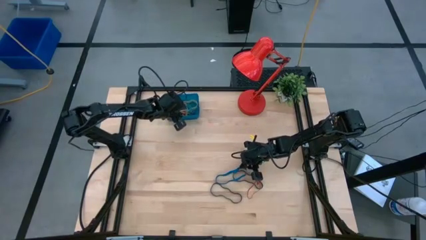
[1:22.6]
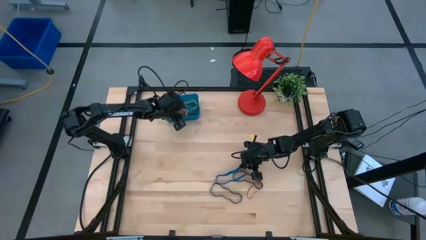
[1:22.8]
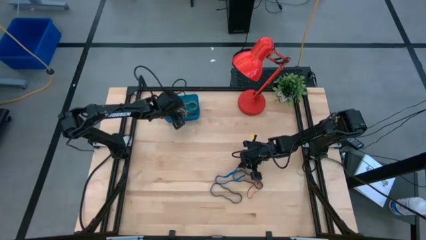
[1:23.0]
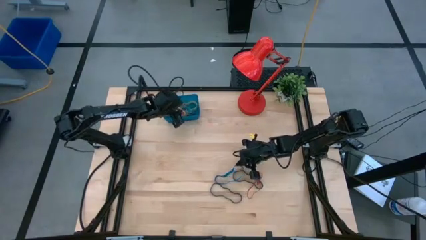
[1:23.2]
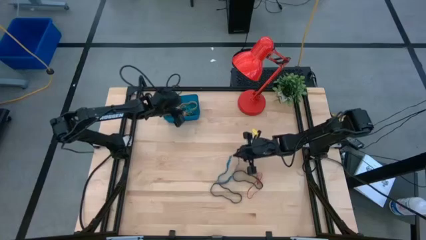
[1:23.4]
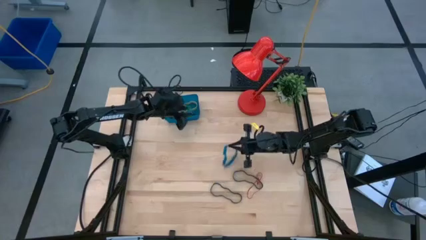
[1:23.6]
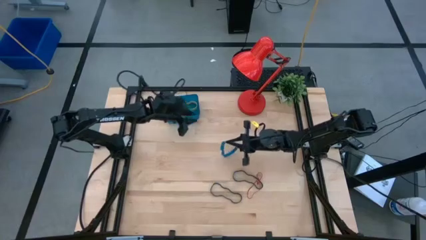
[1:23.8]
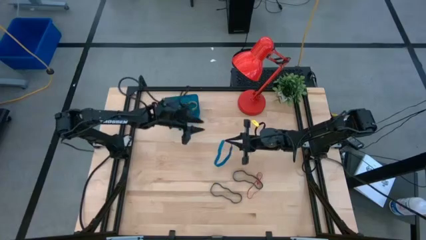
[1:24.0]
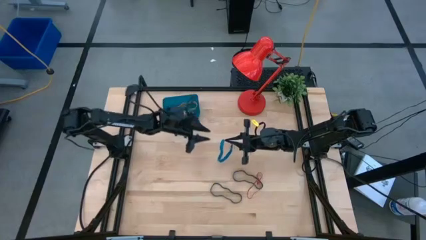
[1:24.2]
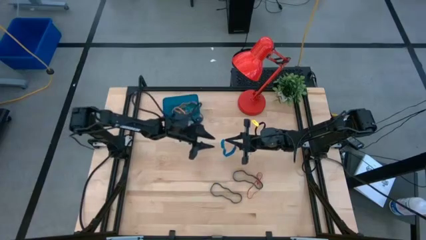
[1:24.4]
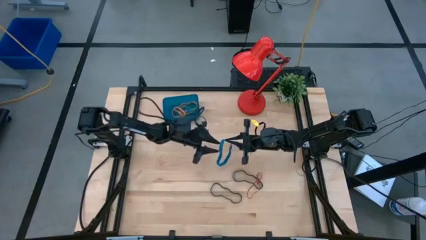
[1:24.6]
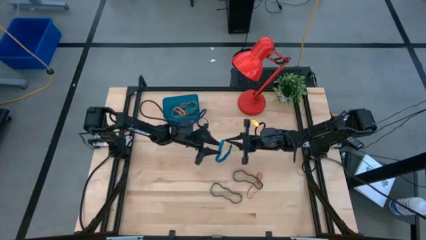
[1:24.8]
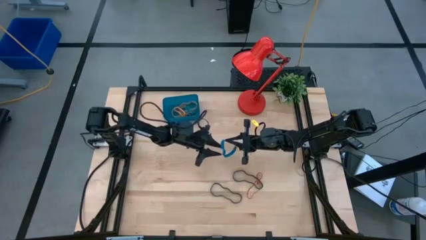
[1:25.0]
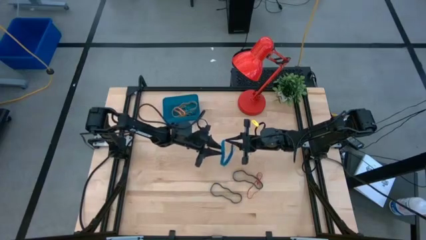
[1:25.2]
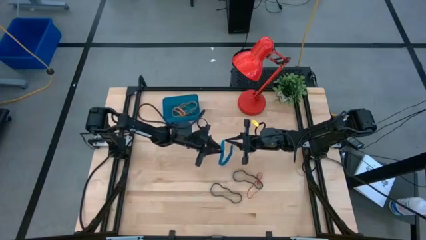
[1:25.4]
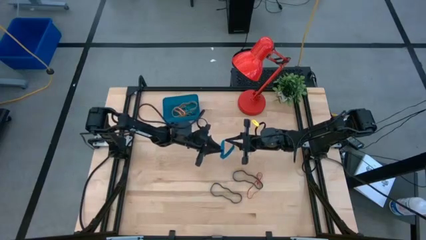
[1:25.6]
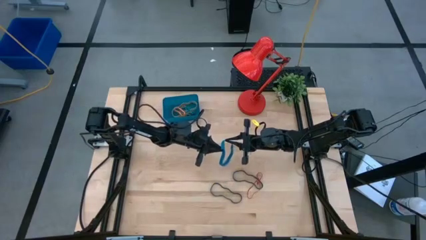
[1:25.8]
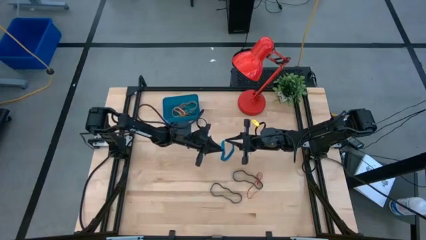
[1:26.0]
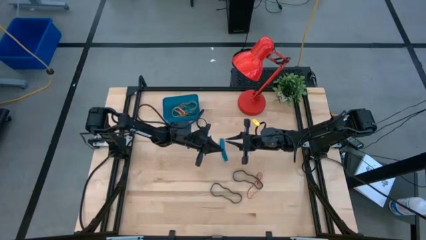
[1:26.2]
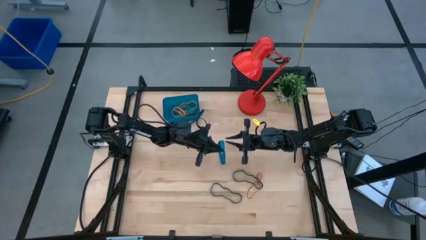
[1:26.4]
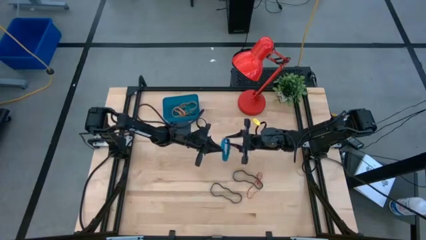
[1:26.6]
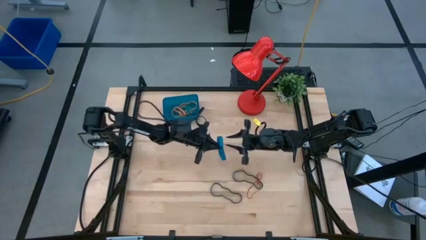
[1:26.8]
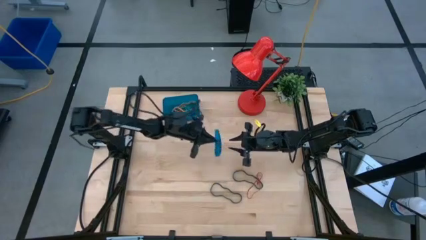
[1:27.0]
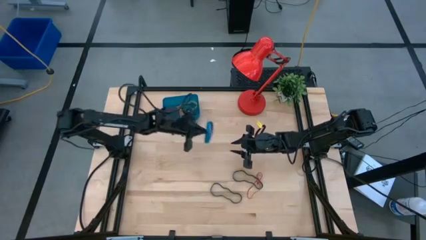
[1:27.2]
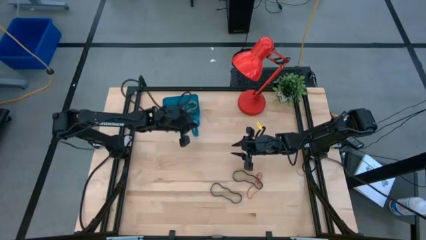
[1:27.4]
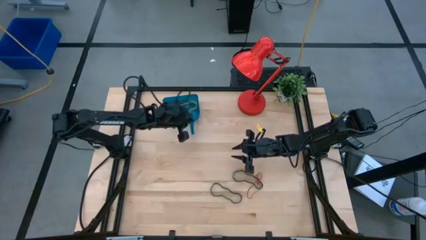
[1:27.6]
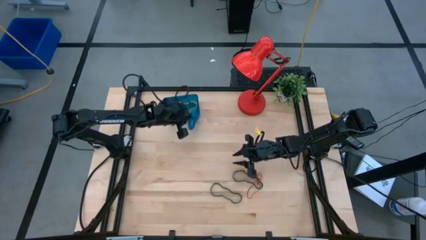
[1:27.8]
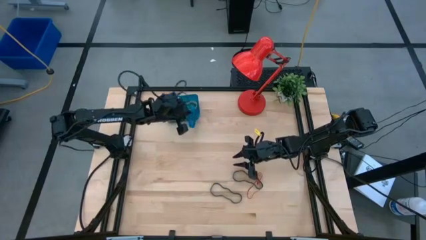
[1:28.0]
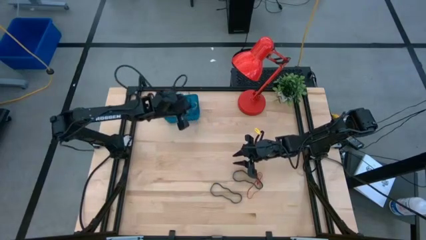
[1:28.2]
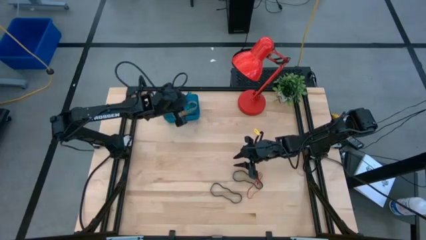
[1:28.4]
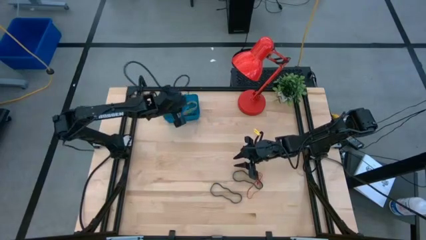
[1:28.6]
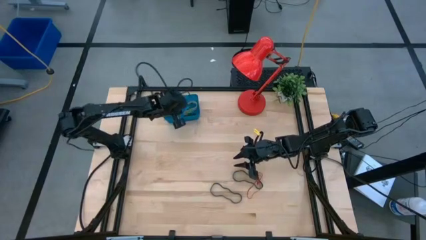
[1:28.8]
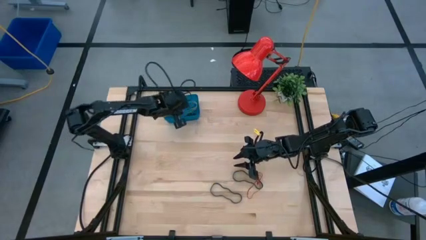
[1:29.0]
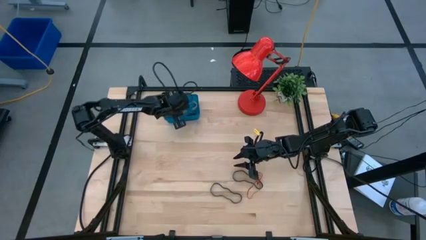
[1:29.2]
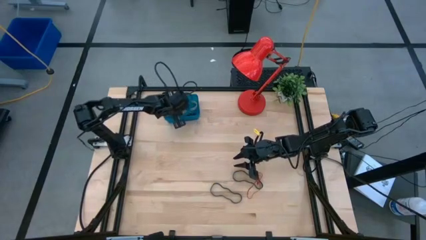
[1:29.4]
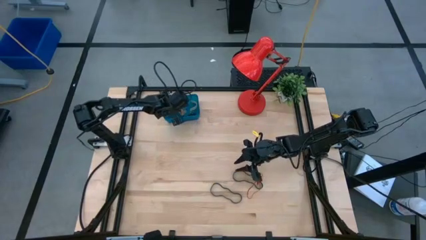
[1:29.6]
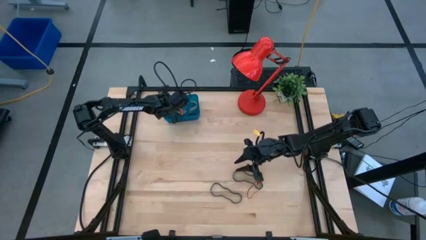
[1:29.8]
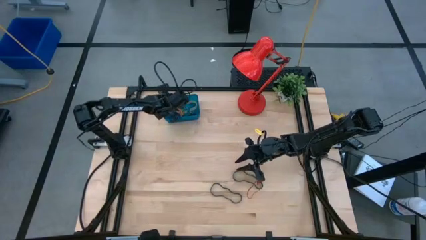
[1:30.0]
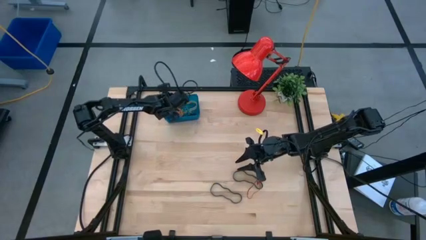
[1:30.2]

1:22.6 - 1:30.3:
Task: Pick and place rubber bands into bin
Put the blue rubber band into the blue container

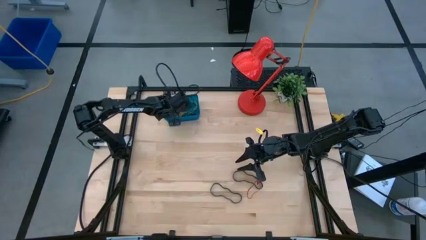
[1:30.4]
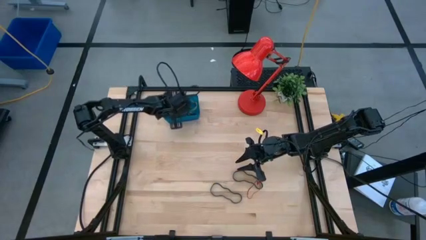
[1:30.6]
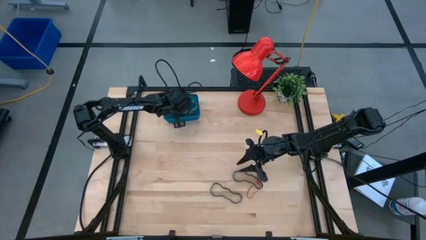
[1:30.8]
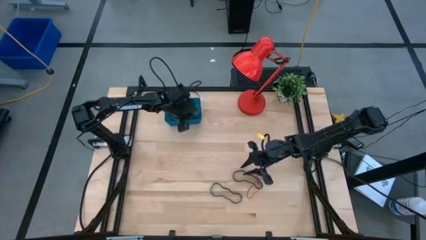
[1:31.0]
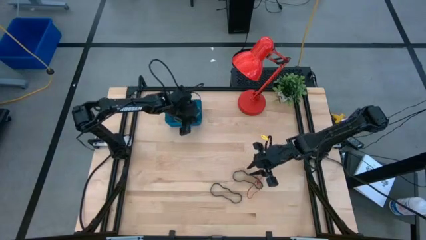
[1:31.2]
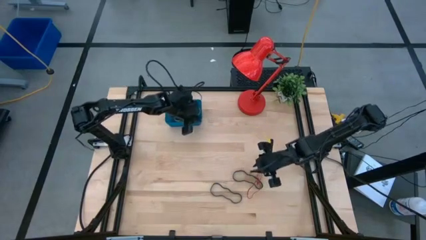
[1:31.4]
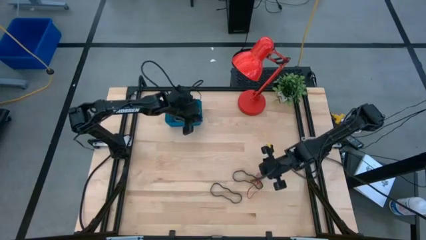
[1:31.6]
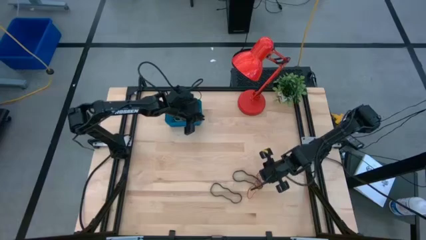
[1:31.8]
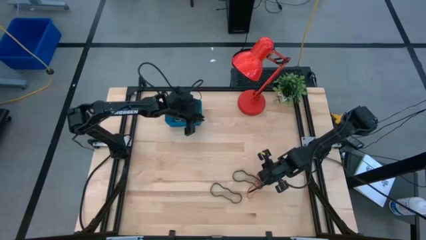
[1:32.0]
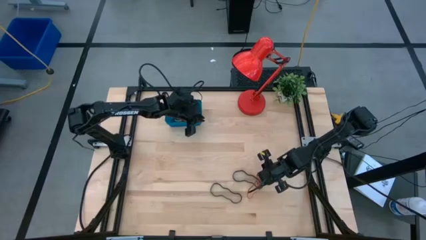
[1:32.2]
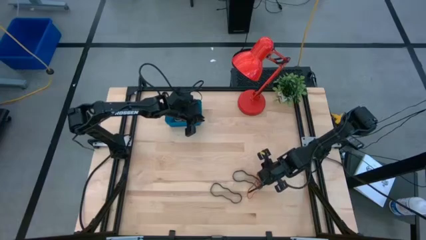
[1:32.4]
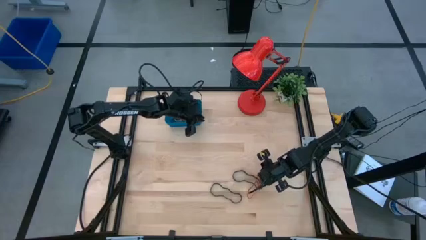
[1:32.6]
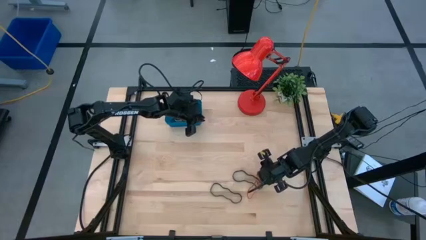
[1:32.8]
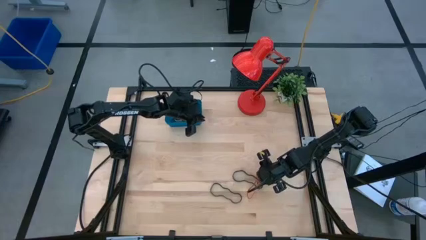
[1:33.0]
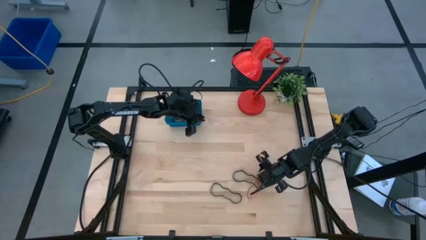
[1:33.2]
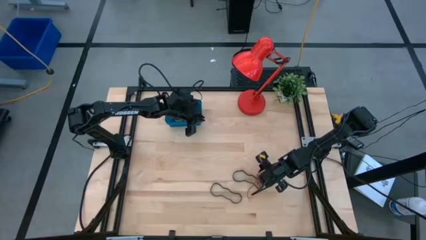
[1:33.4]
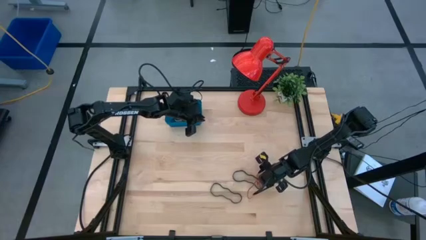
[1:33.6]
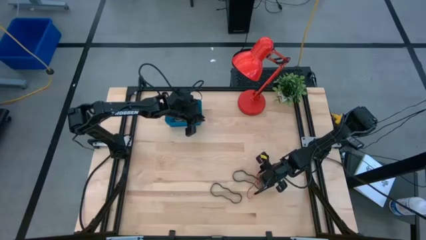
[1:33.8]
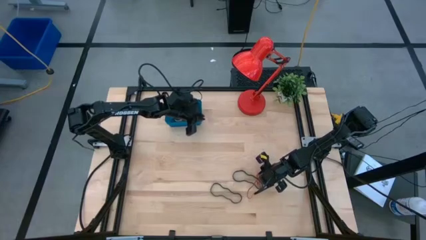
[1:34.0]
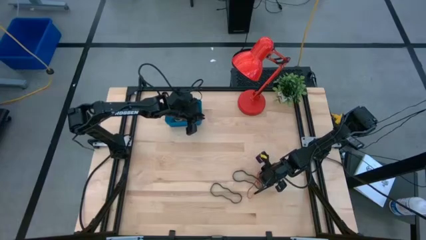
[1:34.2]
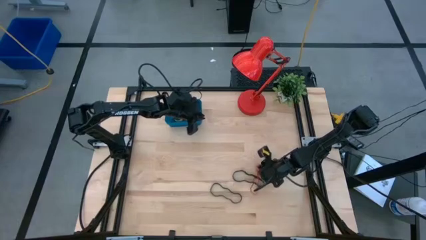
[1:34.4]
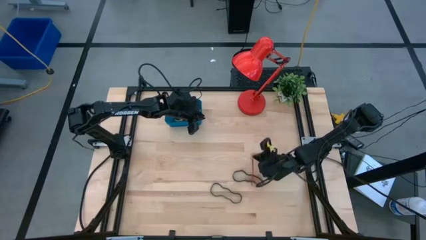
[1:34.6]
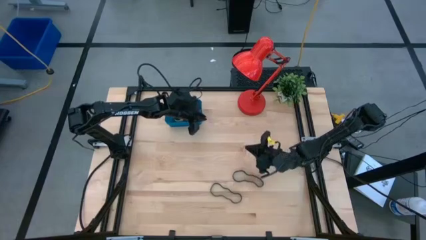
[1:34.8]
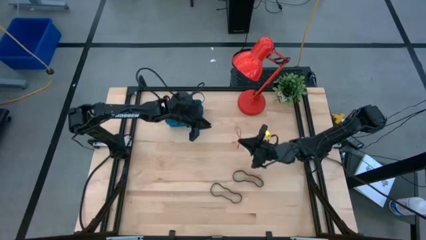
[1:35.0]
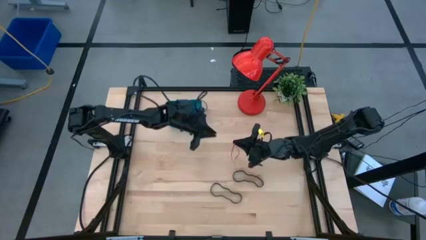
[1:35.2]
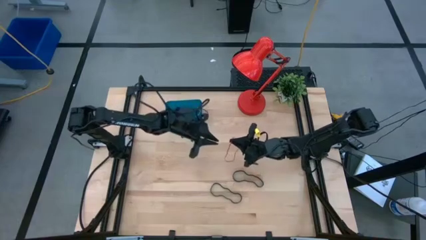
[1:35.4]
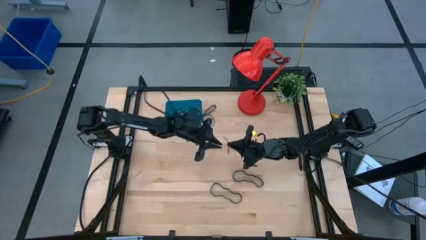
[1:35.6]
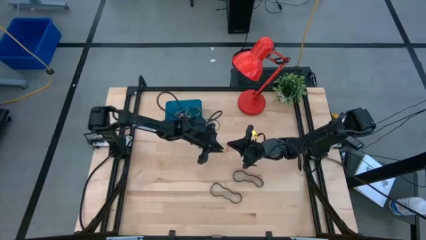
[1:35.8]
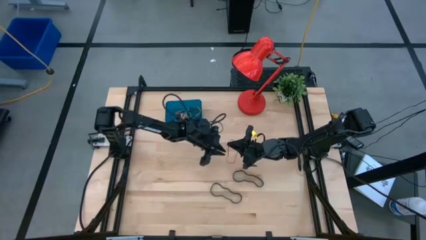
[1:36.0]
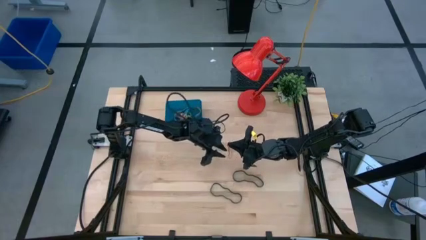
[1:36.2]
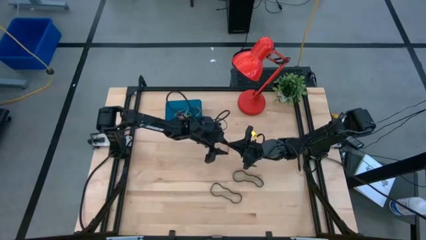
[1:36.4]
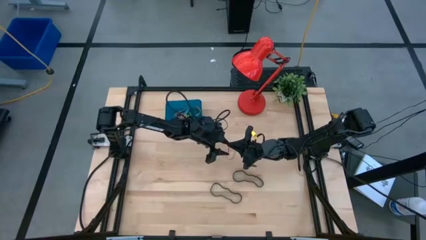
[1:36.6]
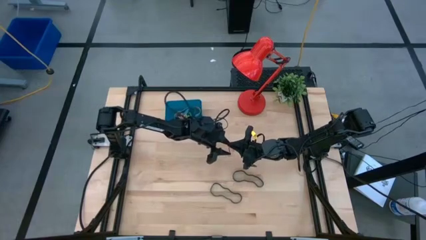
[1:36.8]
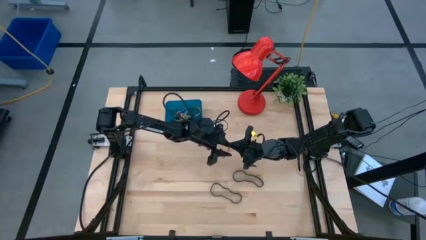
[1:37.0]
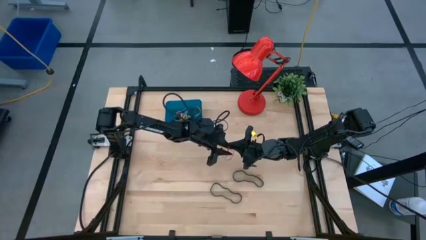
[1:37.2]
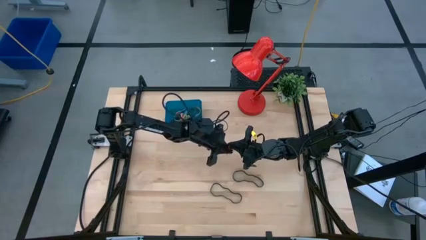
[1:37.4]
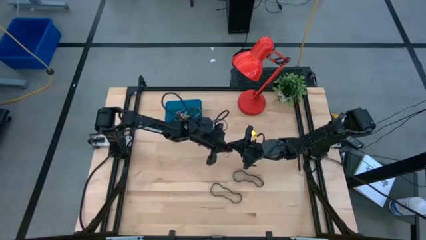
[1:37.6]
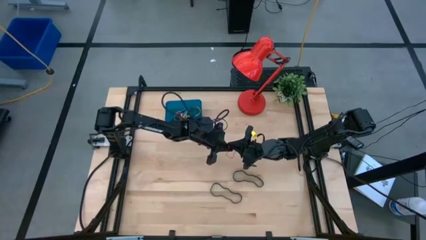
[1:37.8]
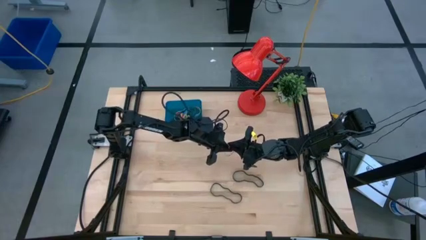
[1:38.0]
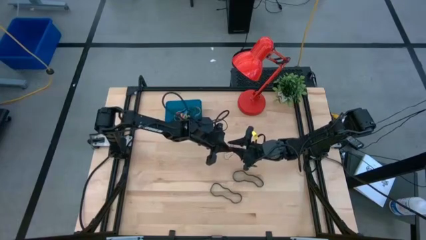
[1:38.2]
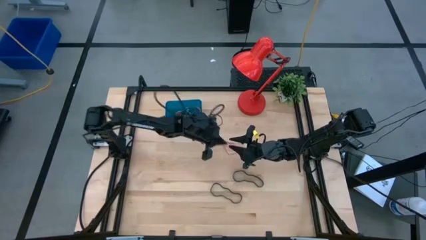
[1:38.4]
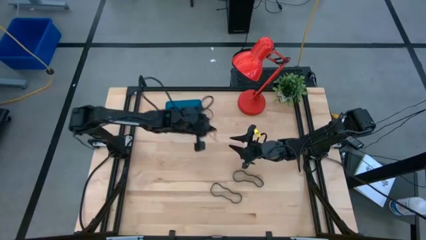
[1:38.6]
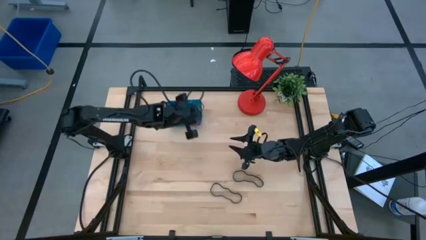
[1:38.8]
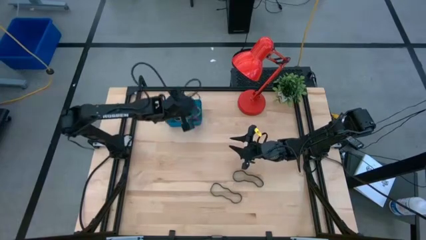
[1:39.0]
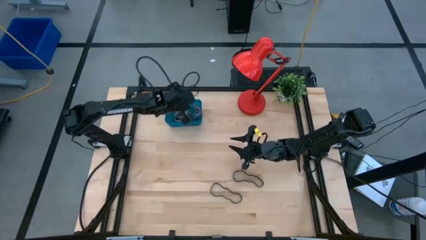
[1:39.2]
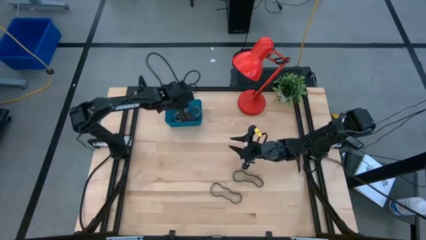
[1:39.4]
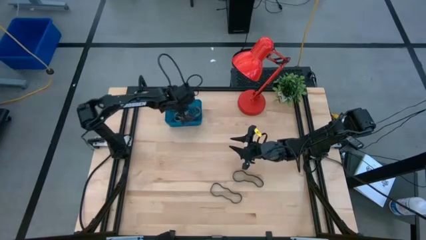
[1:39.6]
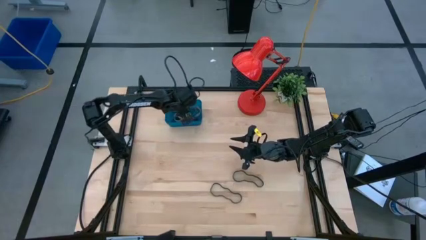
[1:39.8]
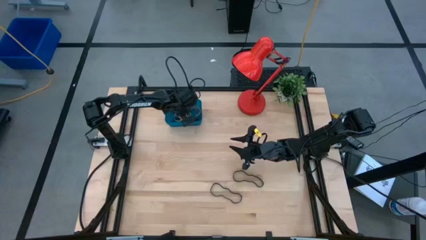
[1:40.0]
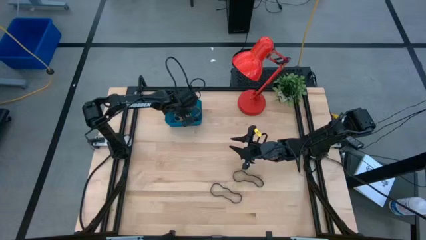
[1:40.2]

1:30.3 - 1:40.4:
Put the red rubber band into the blue container
